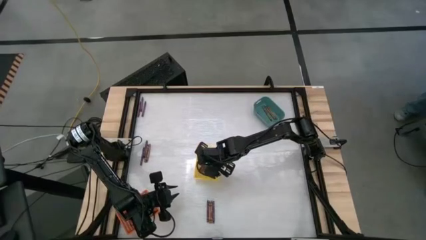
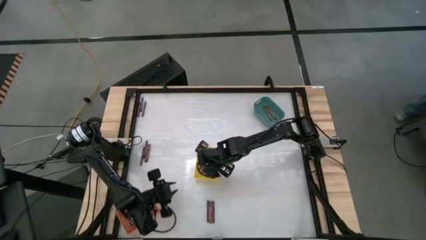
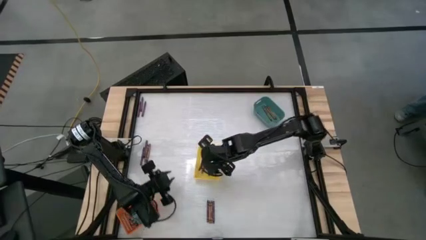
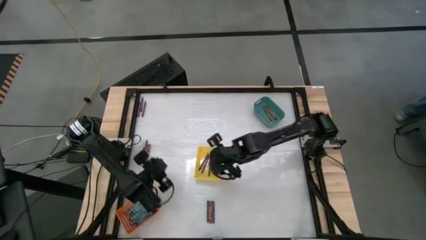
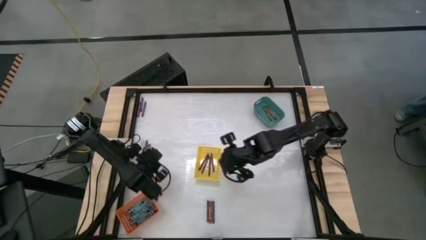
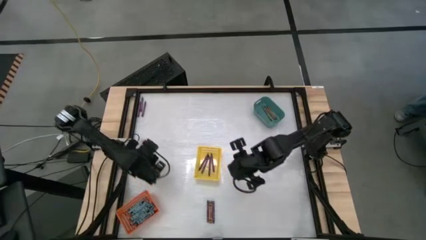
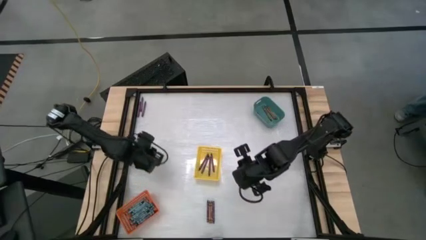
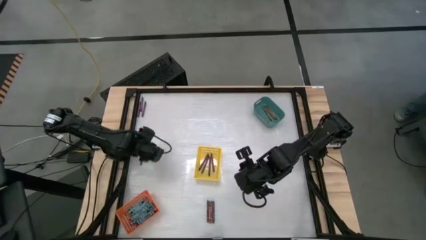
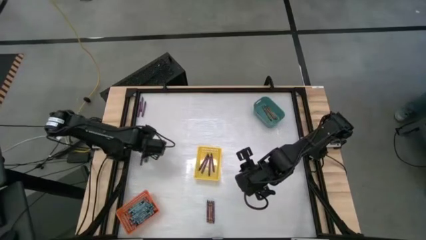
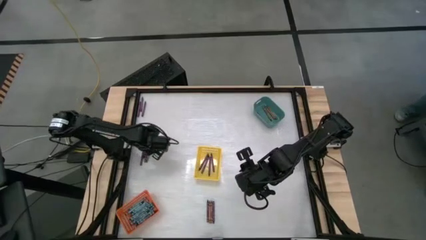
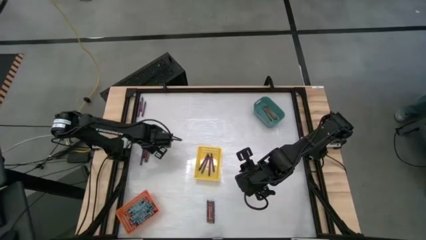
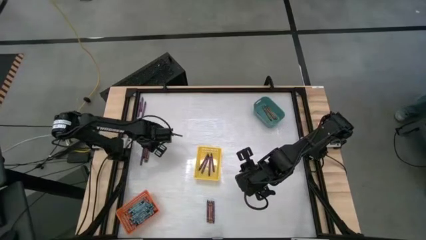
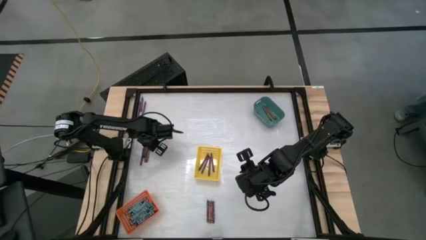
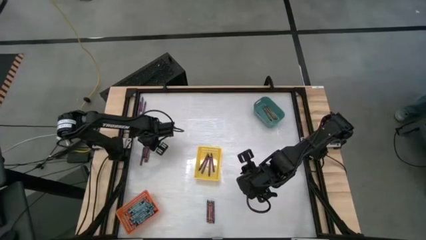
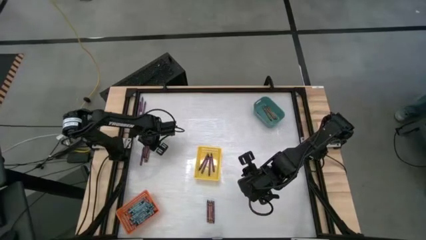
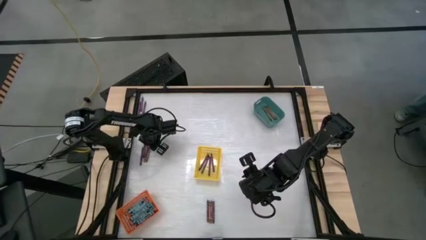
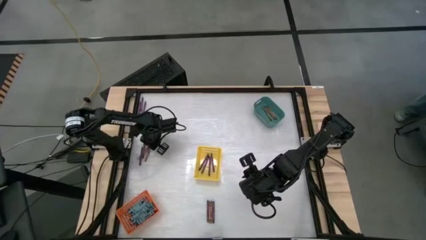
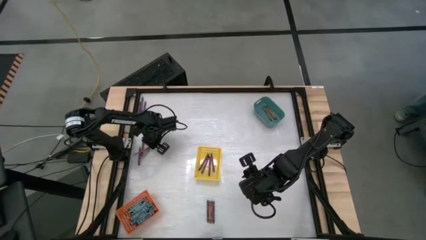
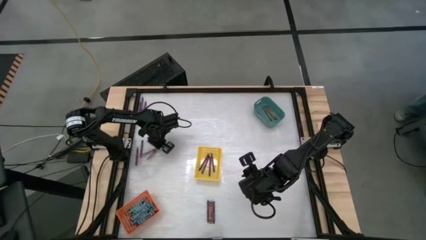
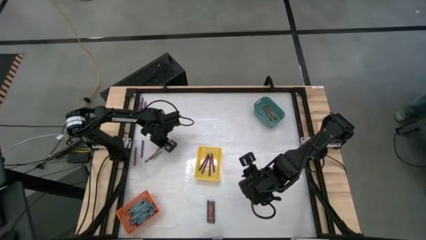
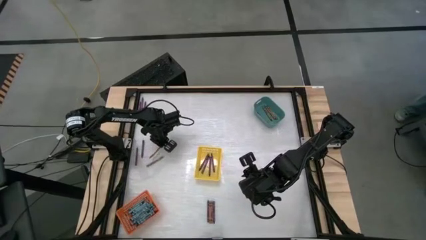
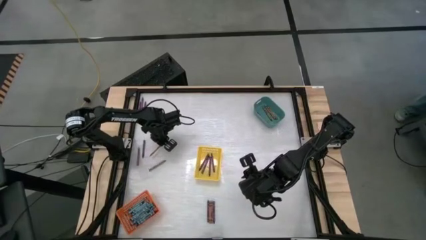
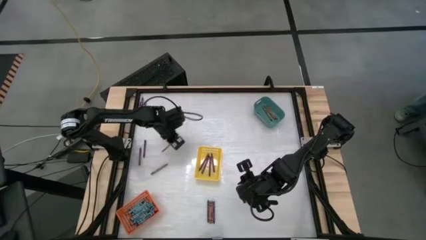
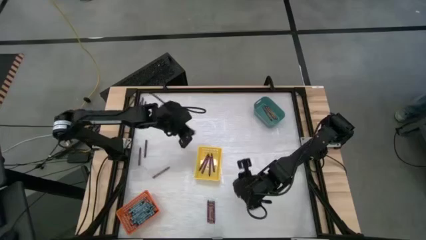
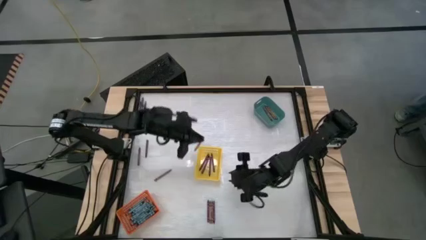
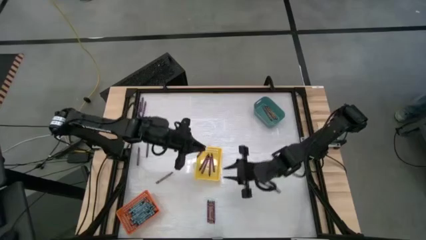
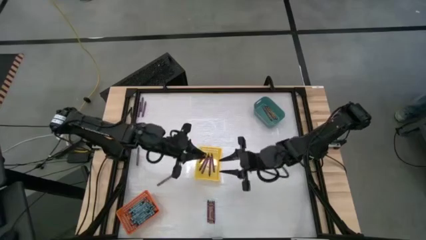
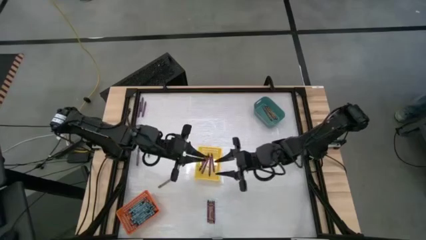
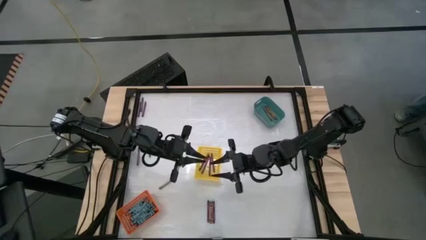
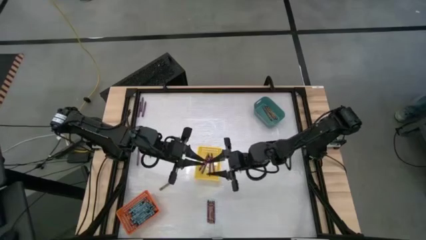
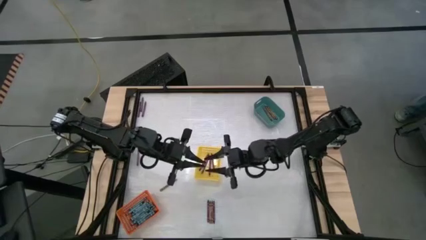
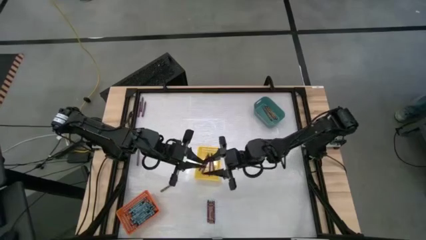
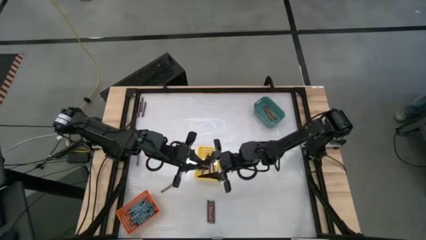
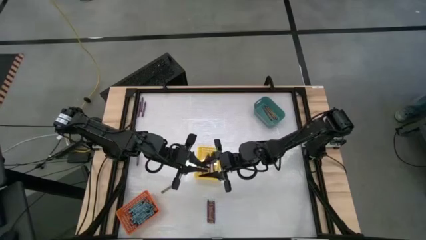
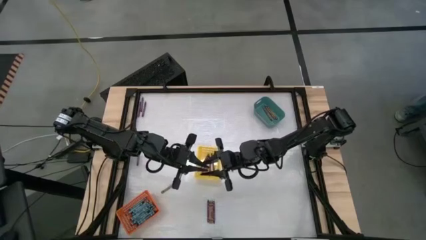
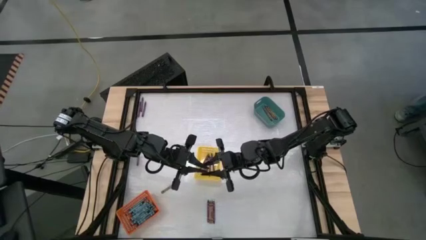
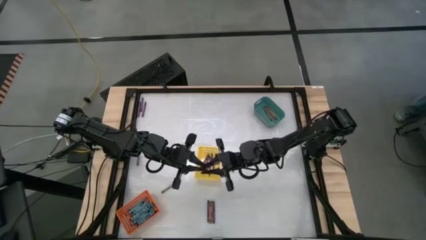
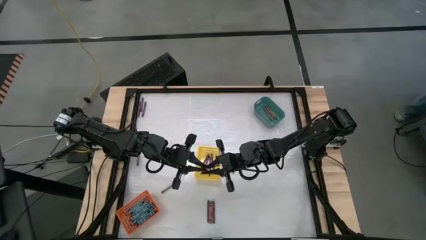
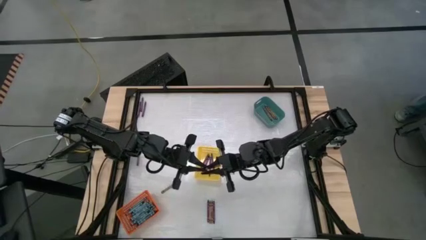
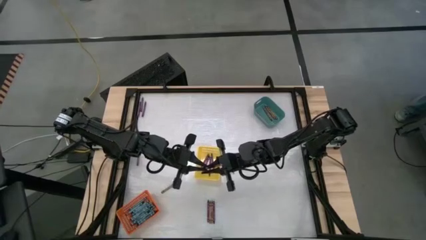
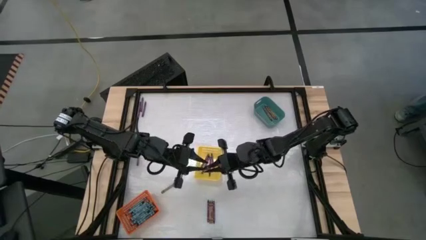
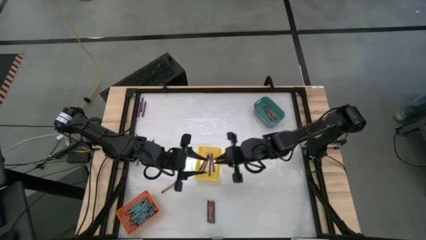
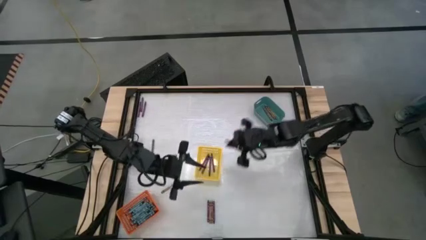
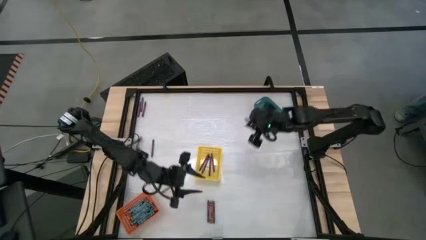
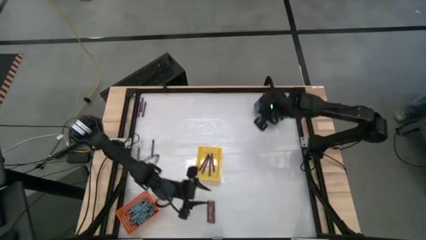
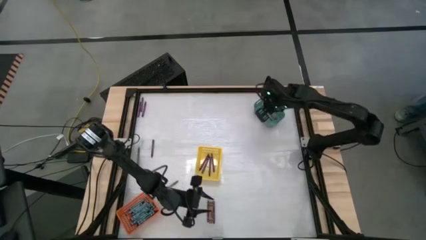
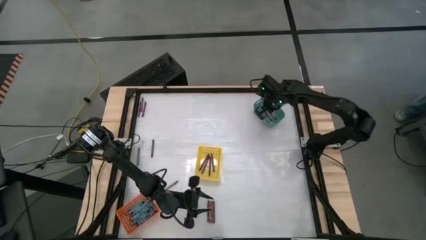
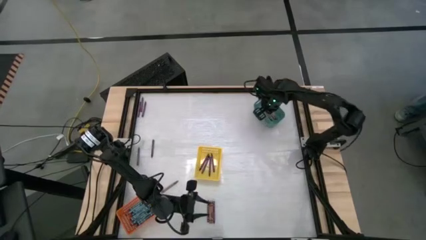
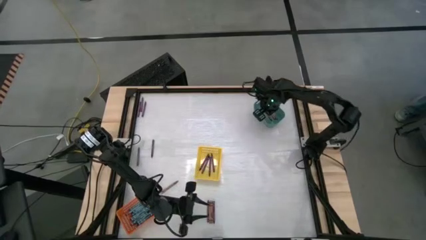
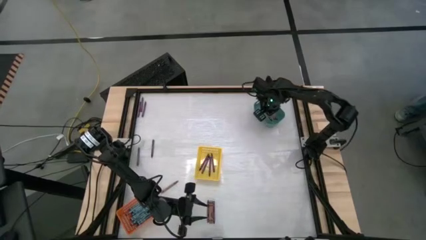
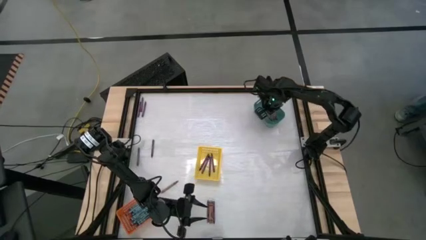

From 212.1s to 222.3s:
Task: Sort crayons
Put the brown crayon into the green bin

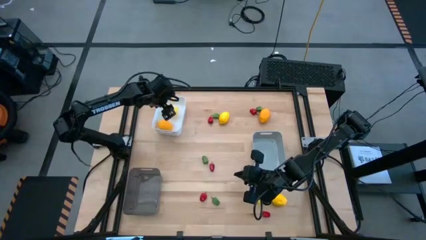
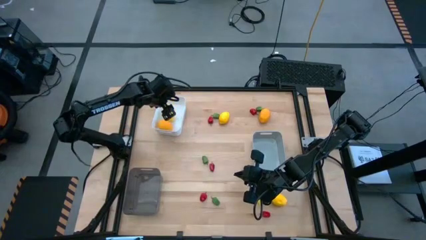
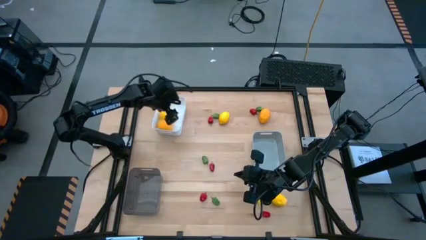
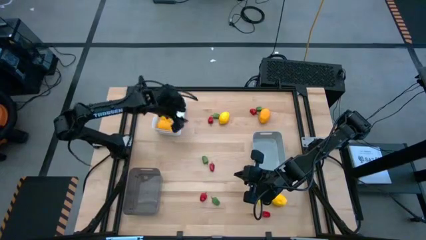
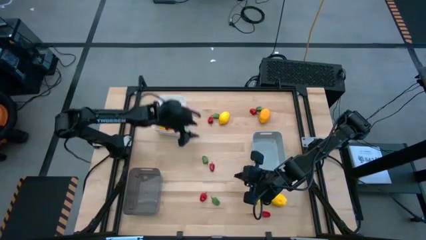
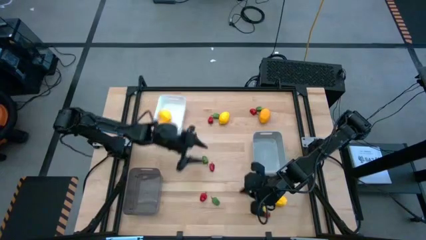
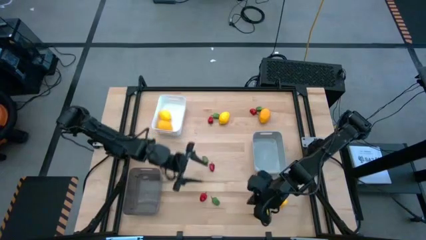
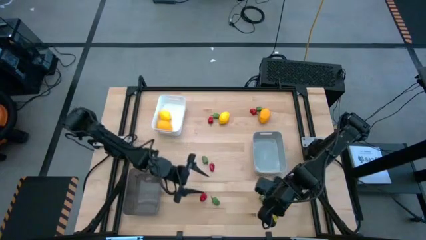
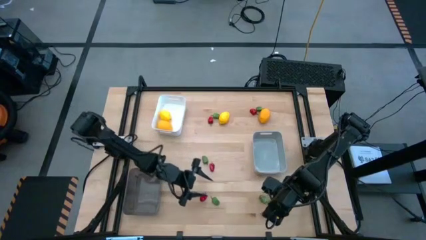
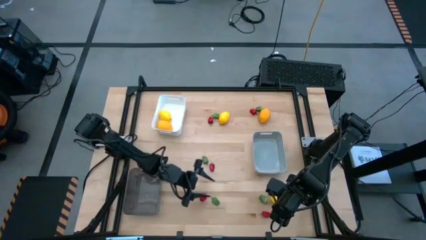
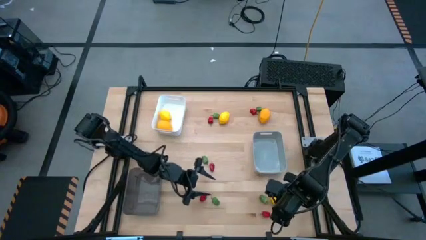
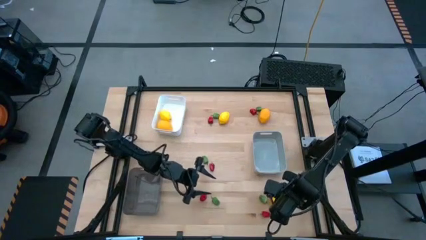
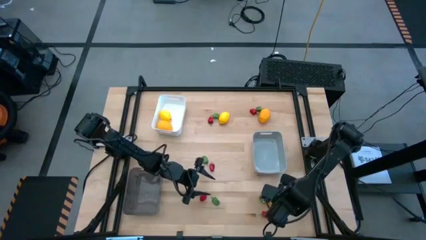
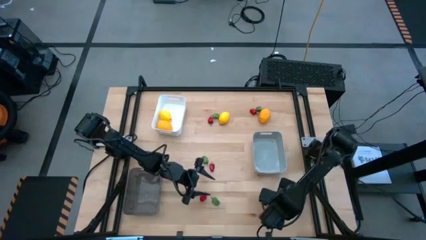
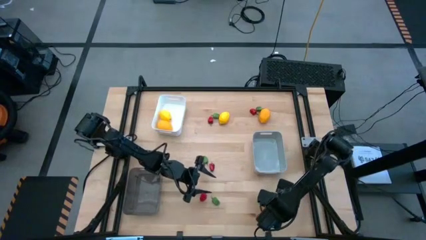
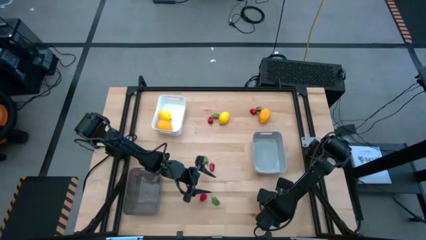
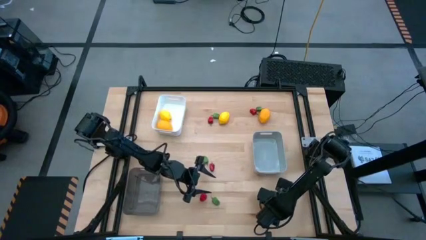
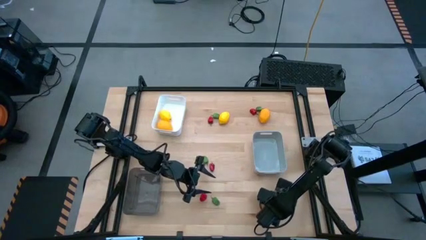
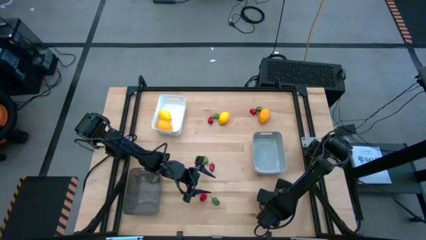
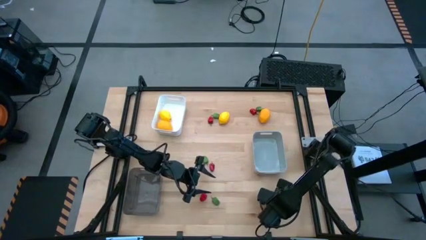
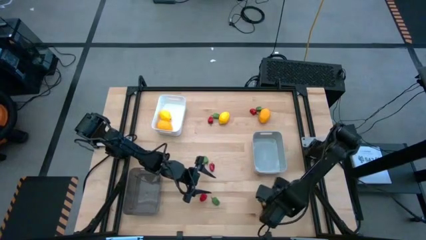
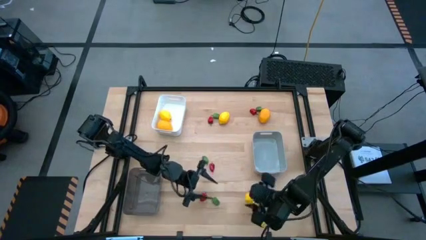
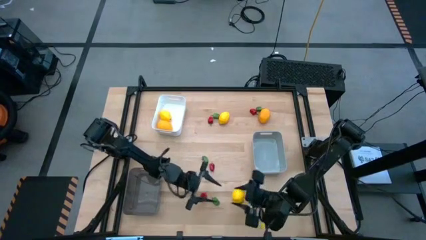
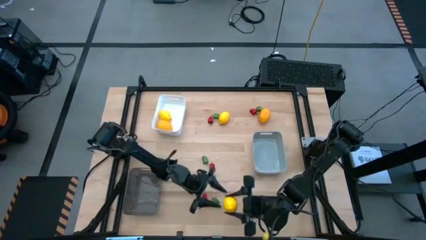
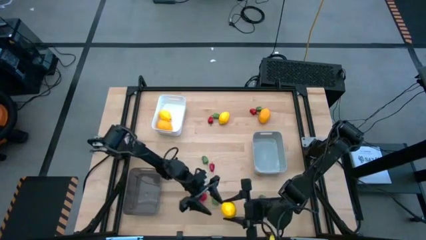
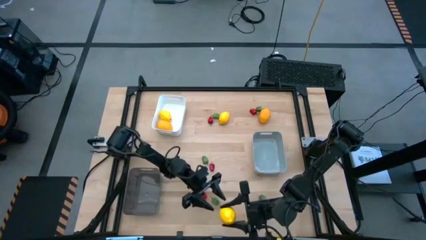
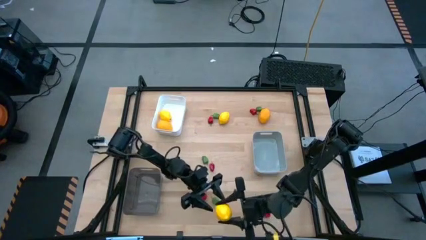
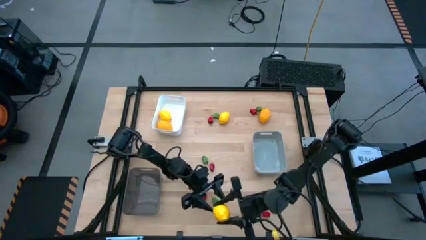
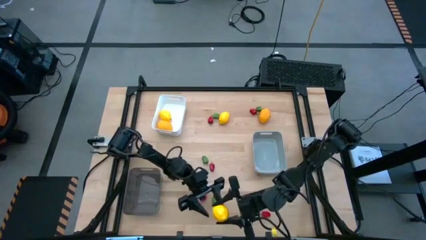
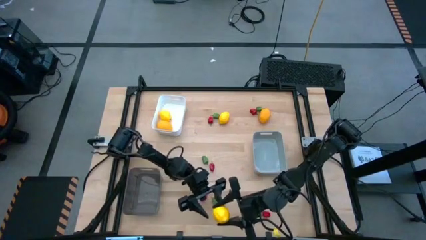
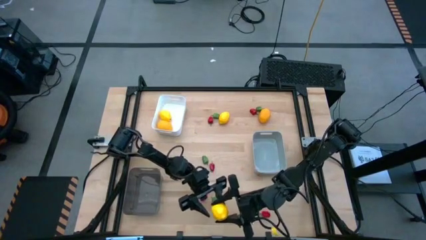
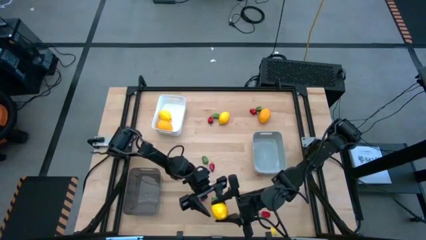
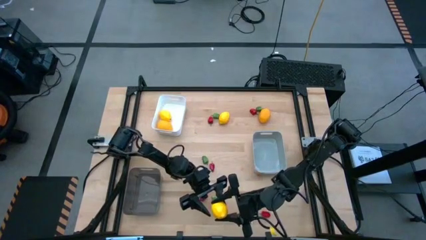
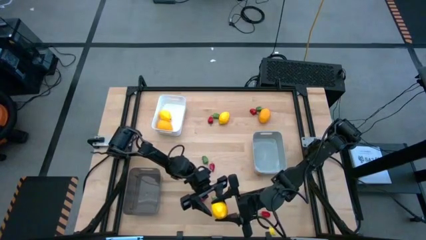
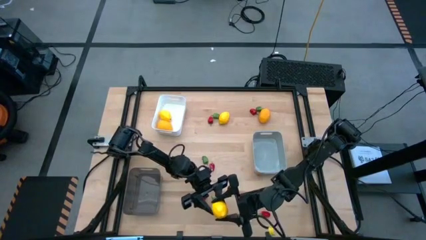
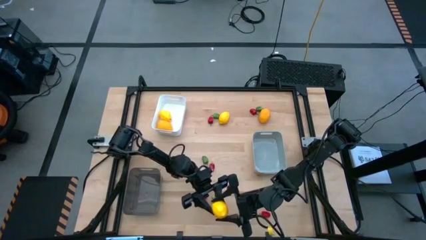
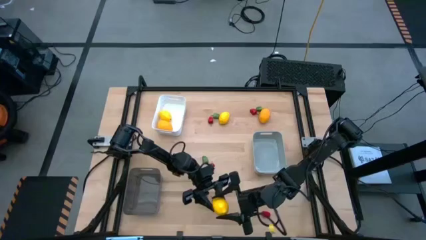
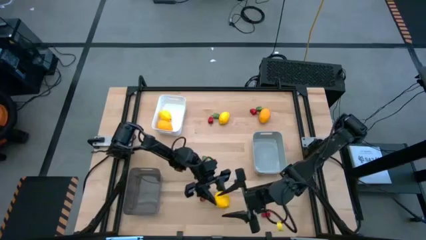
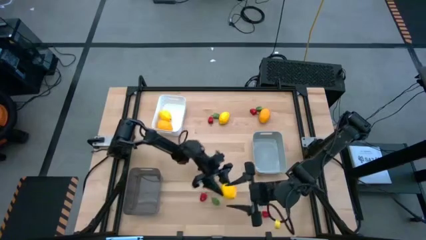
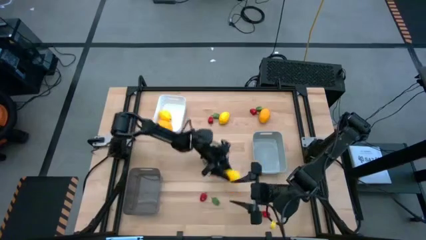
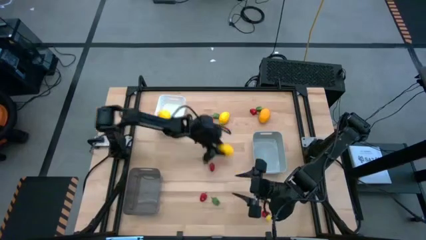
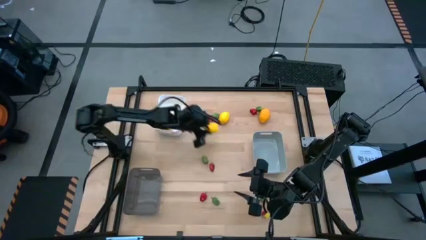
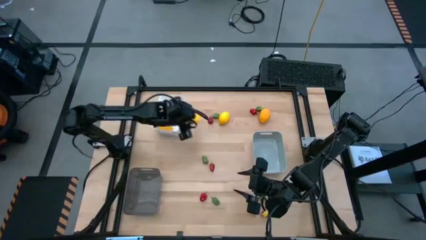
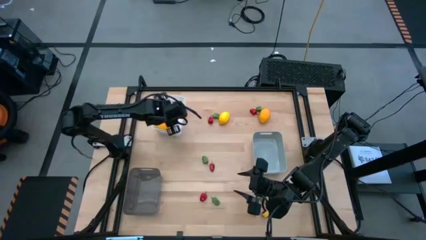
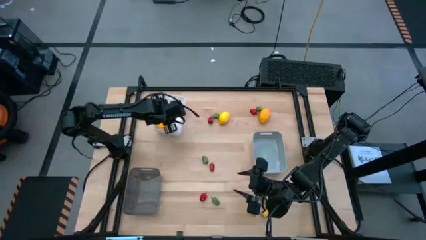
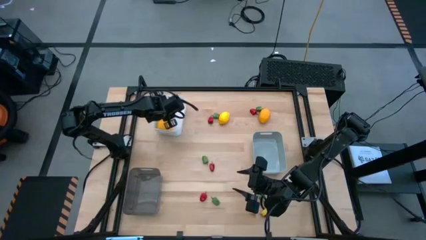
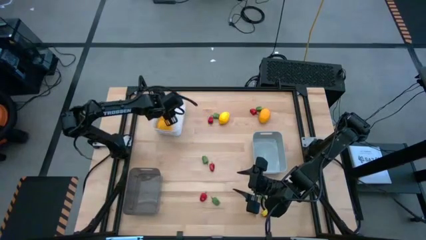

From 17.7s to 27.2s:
Task: Sort produce into baskets
Put the bottom right yellow lemon into the white bin
